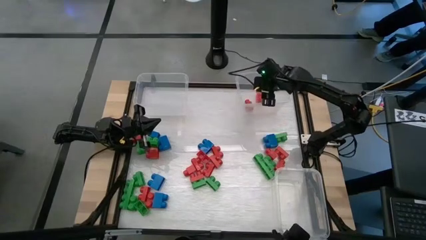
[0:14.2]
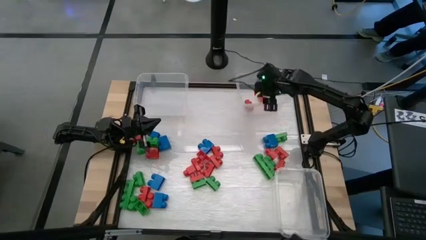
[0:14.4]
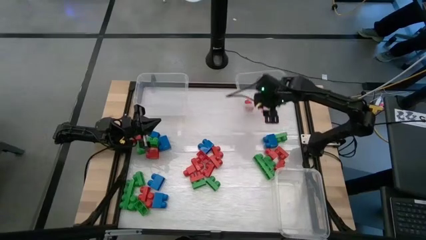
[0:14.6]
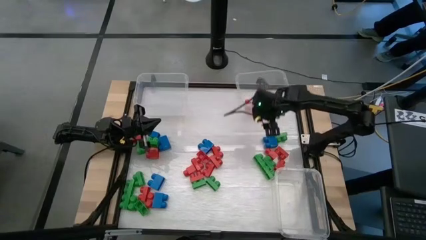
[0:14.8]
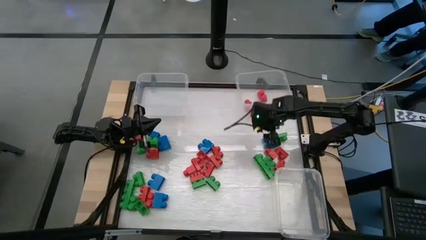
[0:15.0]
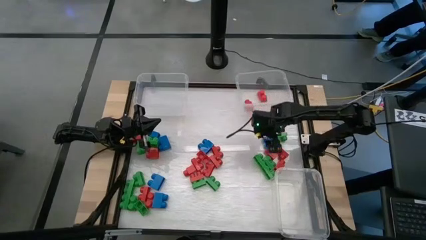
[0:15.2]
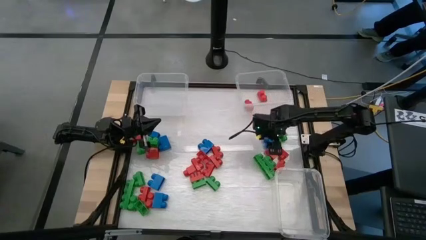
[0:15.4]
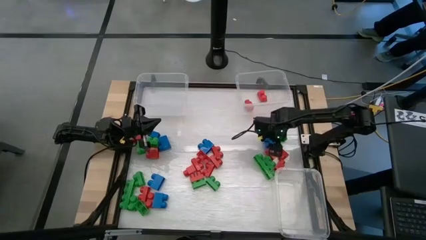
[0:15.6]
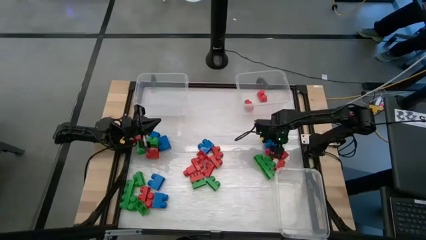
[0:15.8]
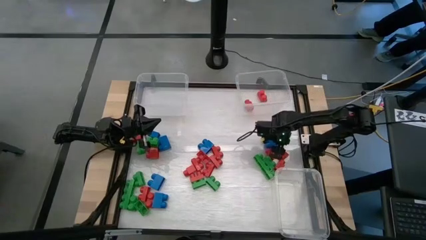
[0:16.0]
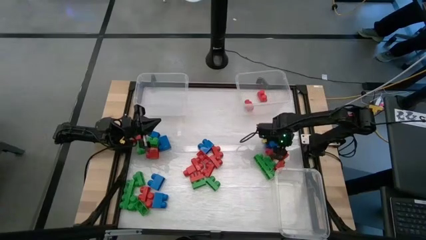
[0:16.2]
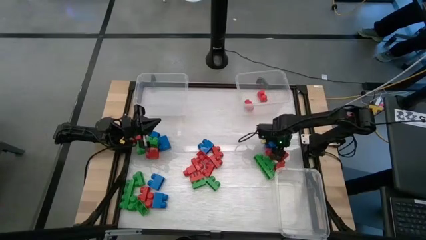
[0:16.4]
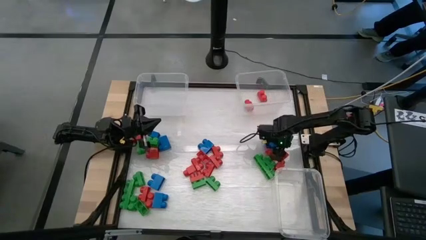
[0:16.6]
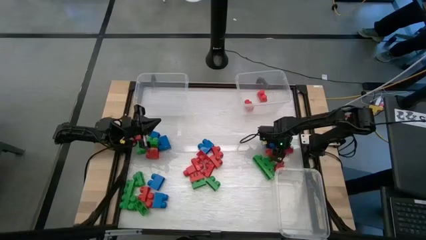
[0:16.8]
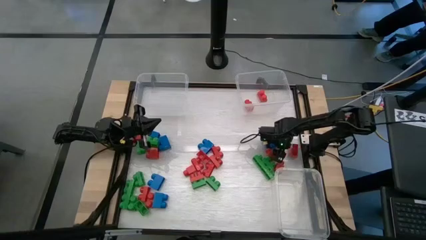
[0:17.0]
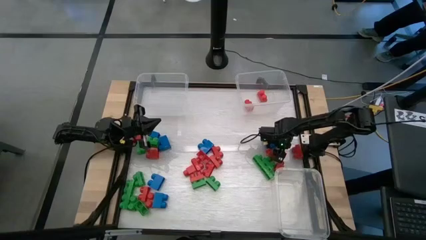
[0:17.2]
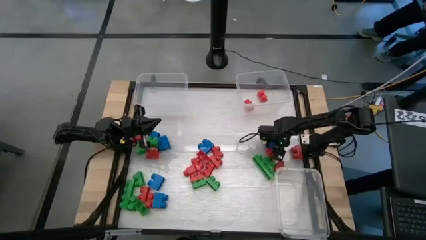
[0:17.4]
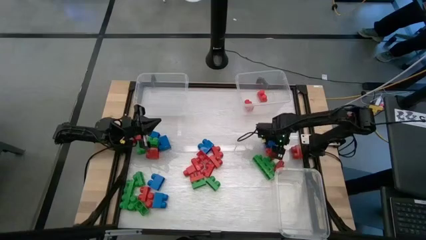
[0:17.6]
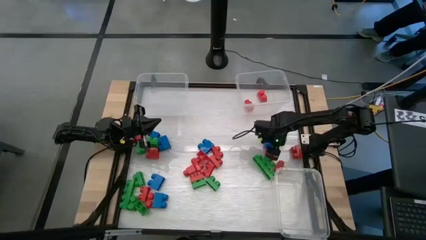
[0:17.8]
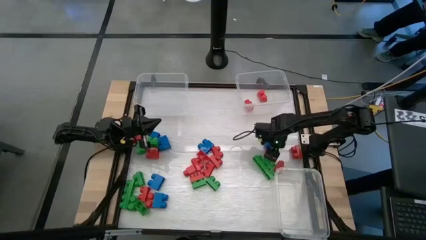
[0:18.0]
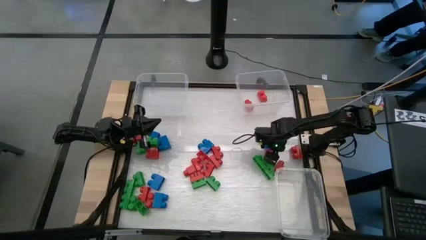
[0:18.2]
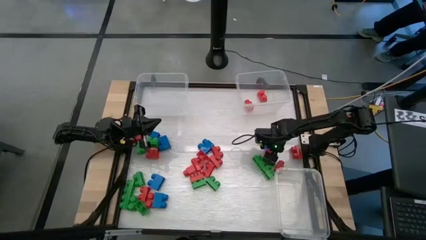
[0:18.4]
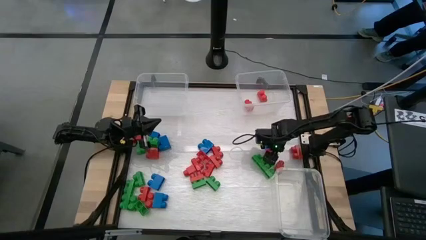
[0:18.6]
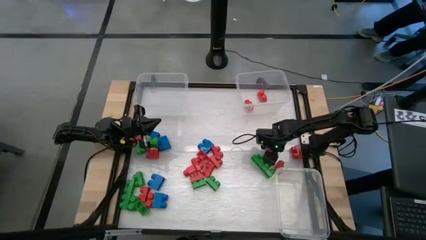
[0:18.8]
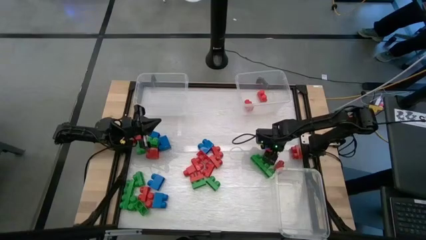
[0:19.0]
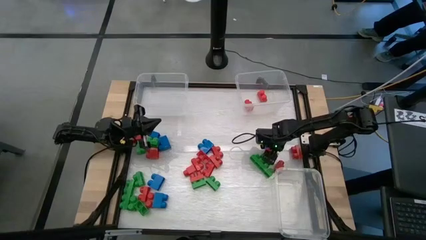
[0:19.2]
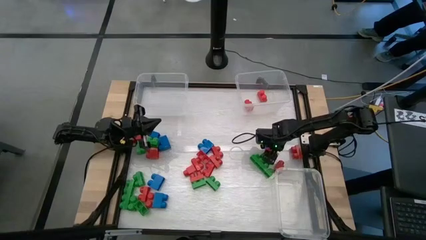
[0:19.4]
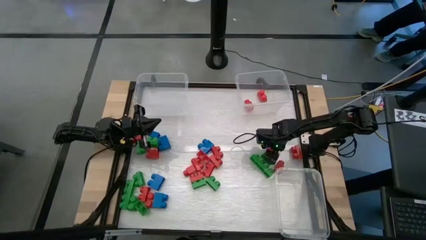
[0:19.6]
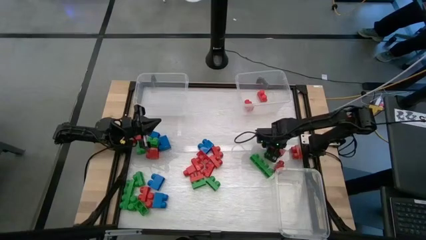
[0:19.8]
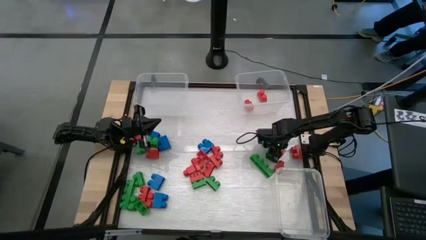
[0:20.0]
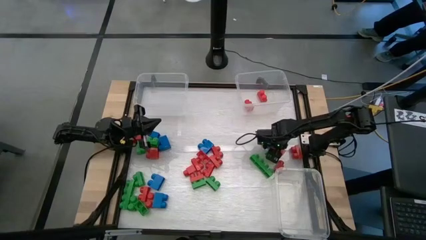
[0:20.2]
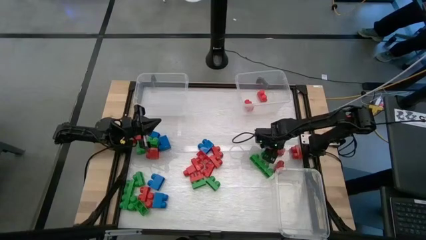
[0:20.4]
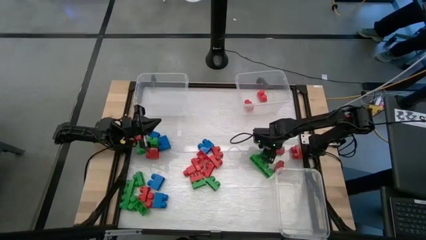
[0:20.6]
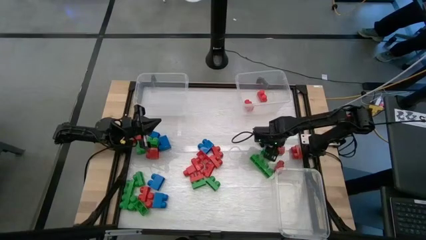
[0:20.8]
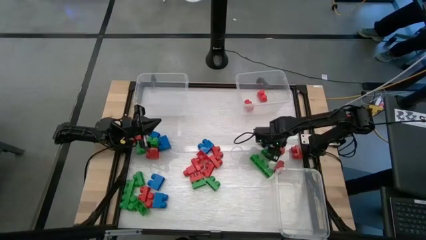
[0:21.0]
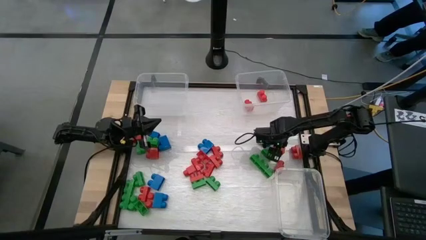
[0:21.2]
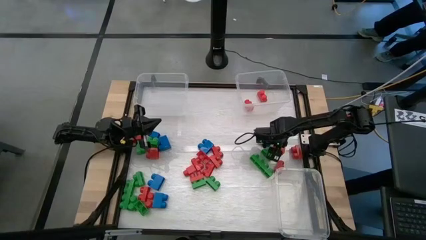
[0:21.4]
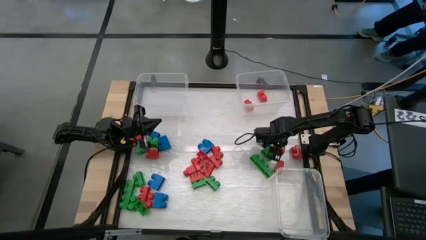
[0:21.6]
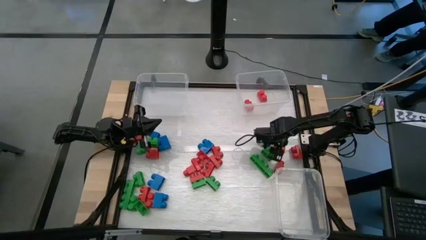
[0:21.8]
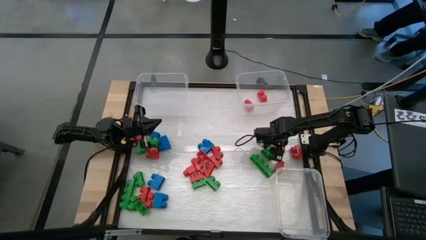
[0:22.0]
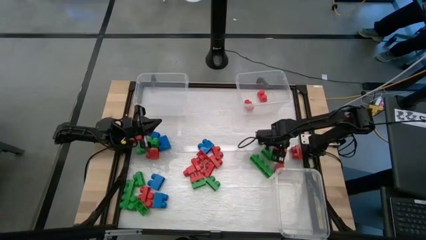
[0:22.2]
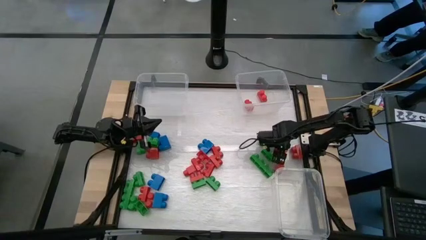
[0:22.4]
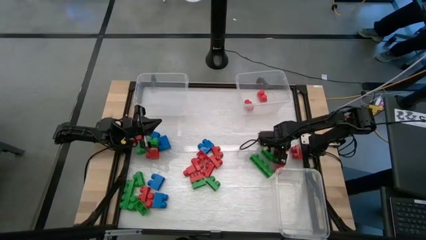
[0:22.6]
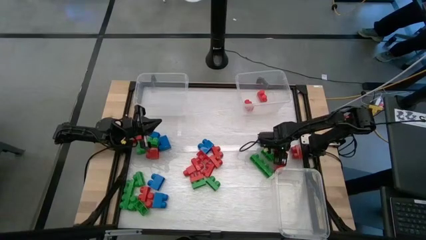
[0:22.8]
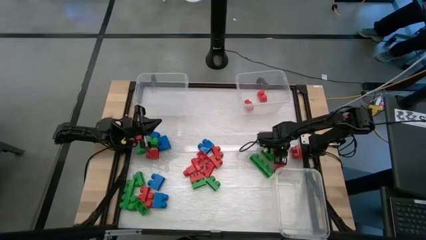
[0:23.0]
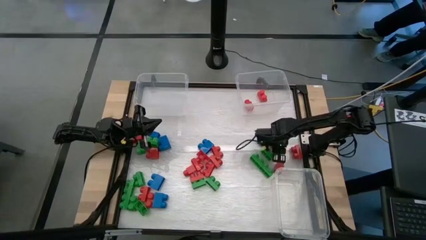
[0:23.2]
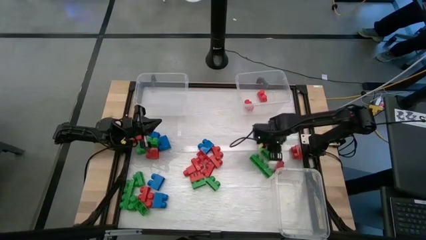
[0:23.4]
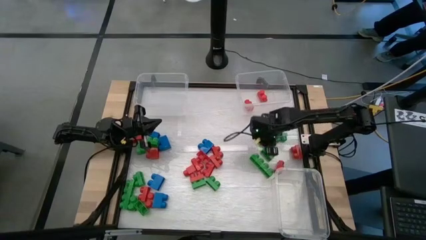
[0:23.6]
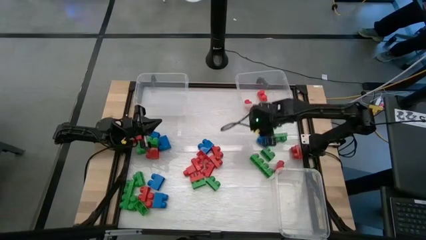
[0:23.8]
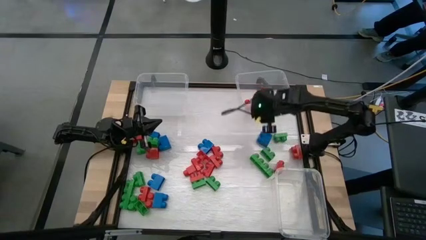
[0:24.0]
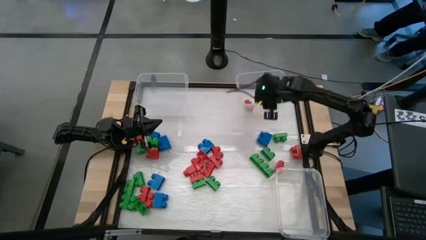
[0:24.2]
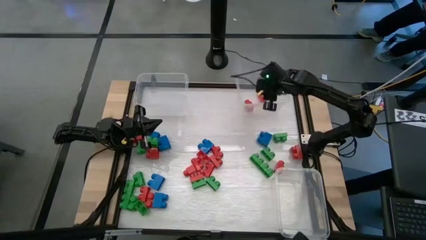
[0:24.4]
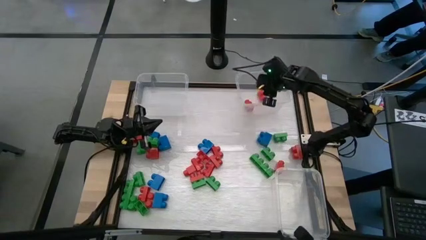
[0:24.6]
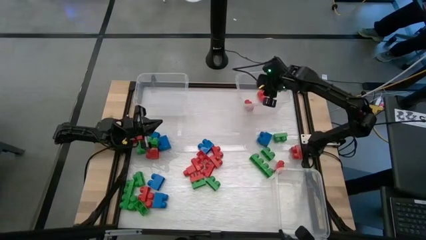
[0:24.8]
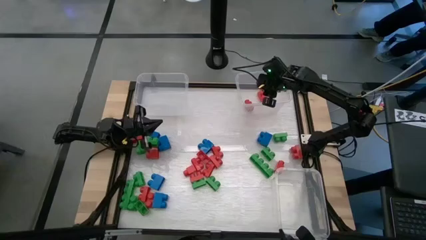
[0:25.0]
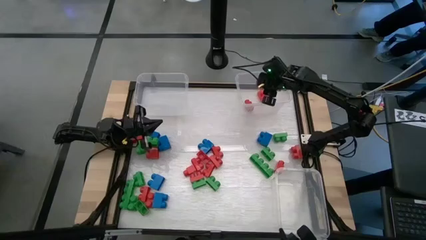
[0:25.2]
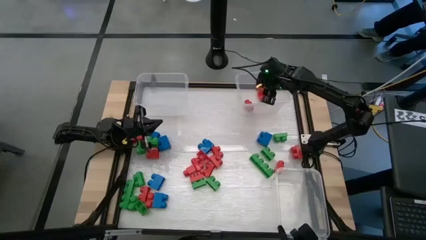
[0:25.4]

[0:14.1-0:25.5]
Task: Sort blocks
Put the red game piece into the top right transparent bin

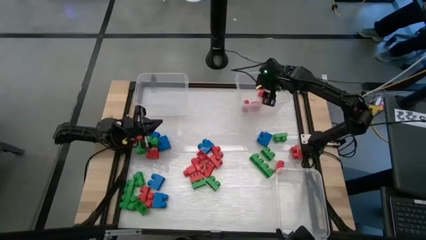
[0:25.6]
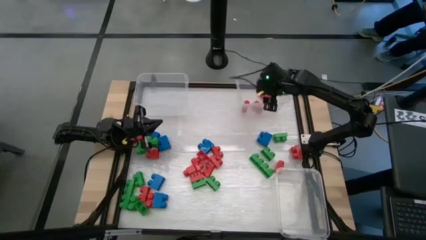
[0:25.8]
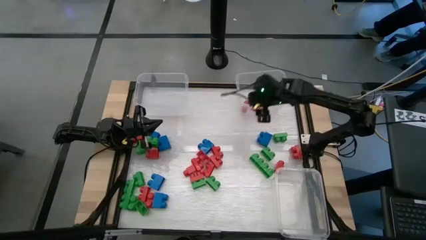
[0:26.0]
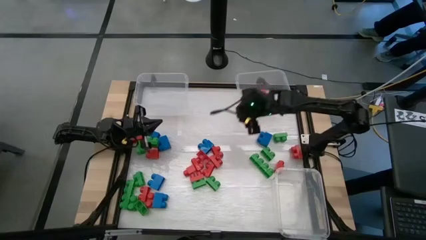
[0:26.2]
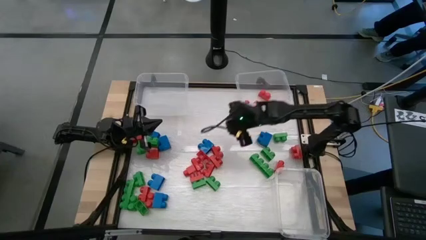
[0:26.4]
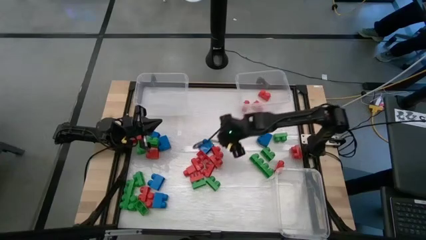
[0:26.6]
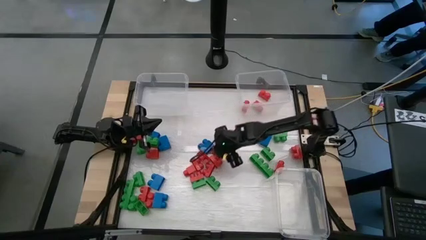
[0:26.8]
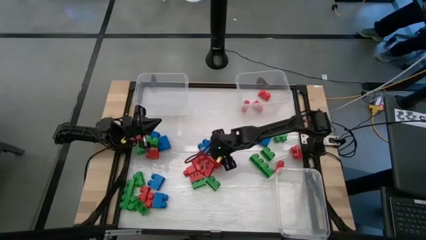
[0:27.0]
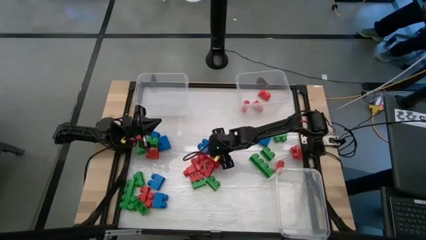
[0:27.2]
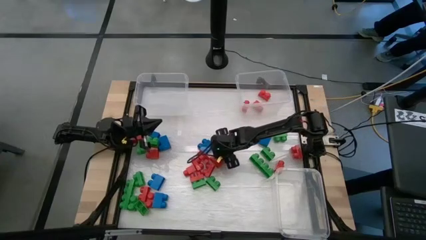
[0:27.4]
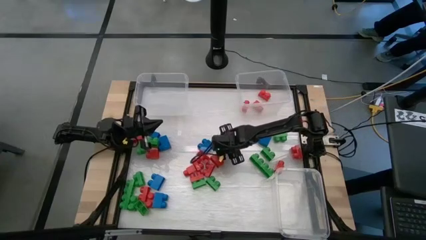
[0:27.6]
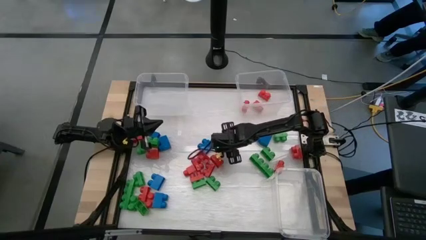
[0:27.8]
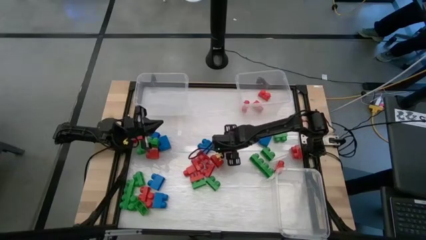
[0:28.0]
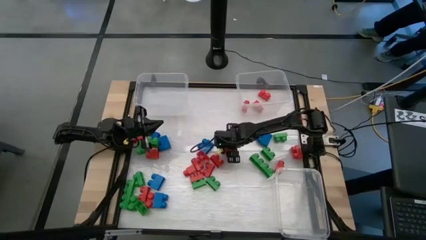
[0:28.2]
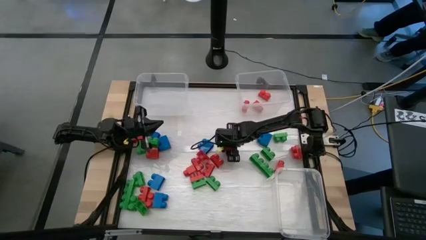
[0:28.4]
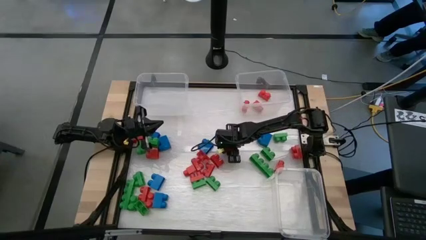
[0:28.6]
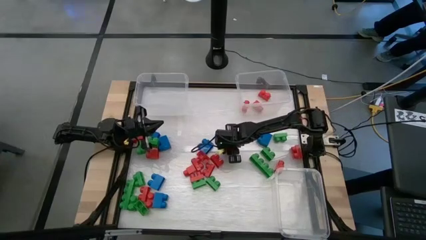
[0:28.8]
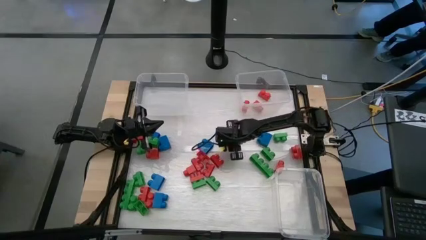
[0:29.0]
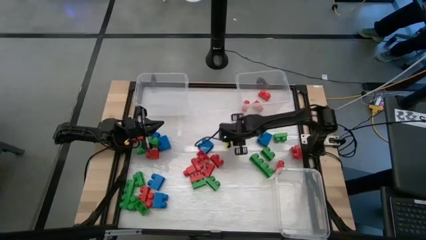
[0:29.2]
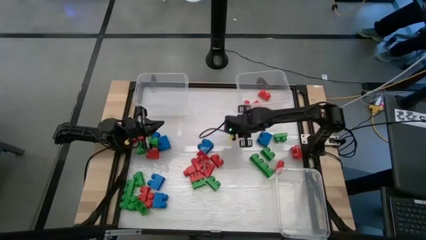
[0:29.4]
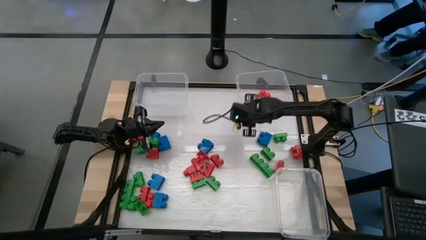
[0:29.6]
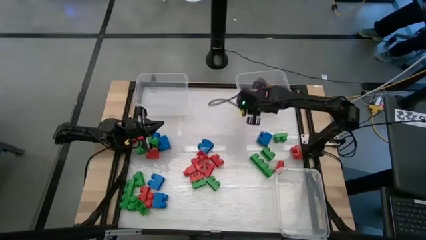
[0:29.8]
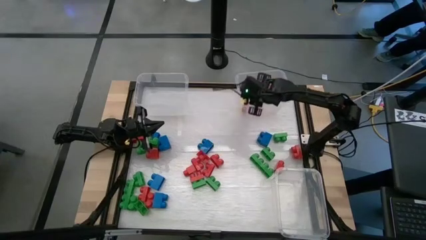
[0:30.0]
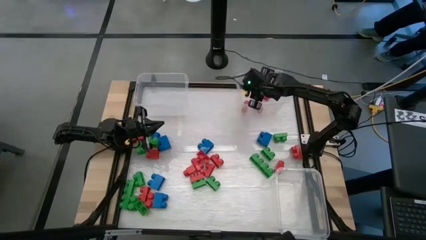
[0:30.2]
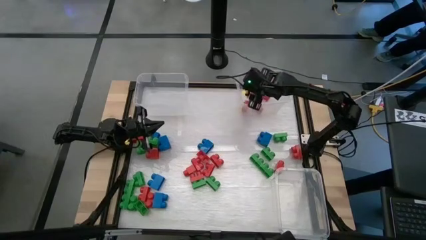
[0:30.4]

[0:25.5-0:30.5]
Put the red game piece into the top right transparent bin
